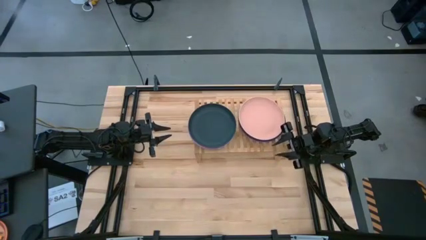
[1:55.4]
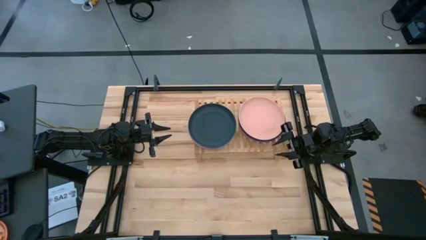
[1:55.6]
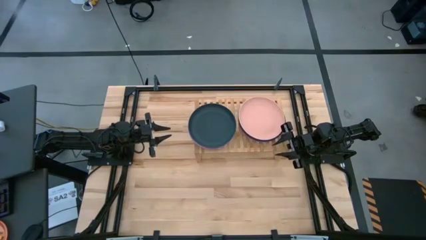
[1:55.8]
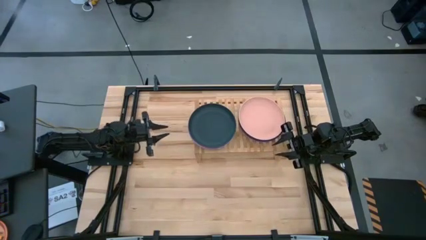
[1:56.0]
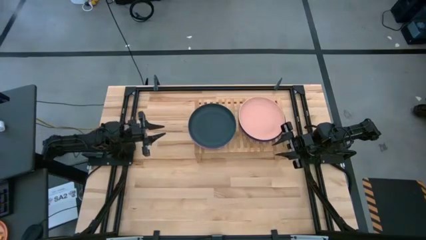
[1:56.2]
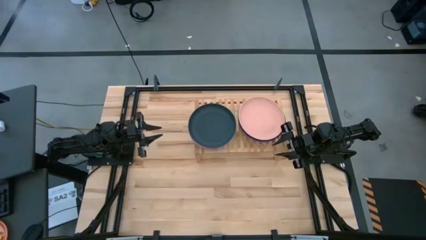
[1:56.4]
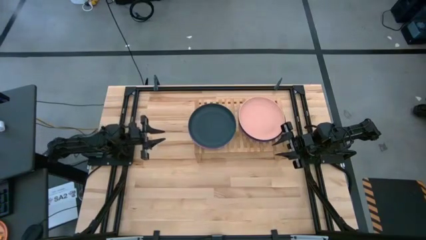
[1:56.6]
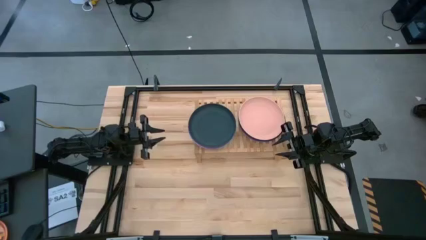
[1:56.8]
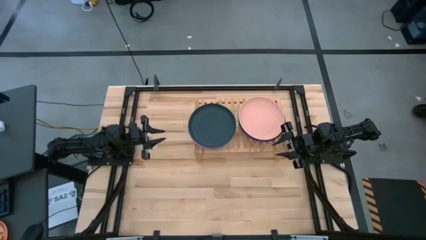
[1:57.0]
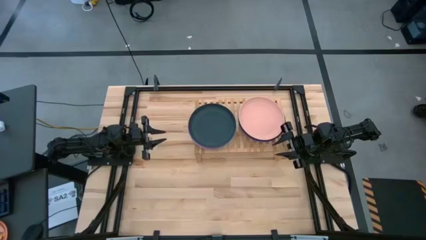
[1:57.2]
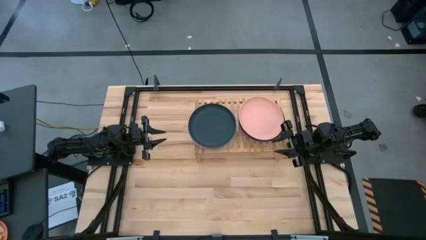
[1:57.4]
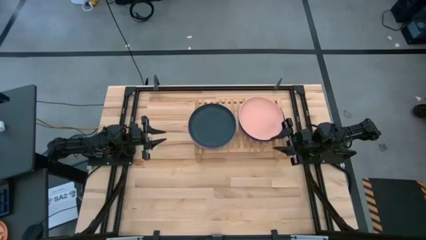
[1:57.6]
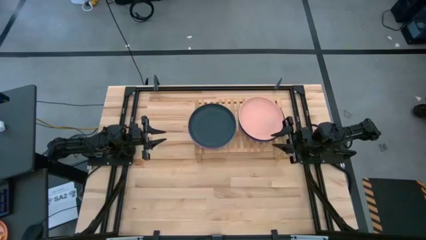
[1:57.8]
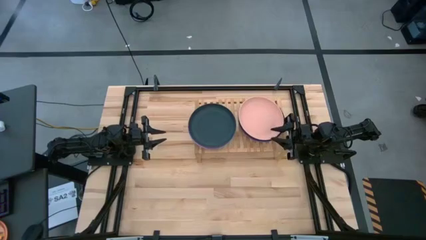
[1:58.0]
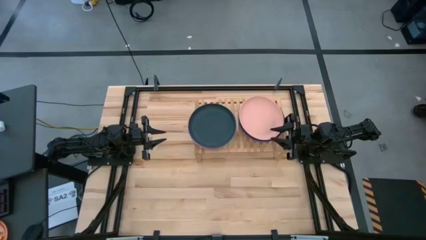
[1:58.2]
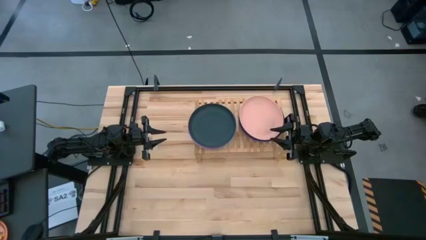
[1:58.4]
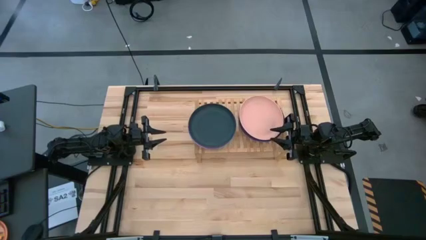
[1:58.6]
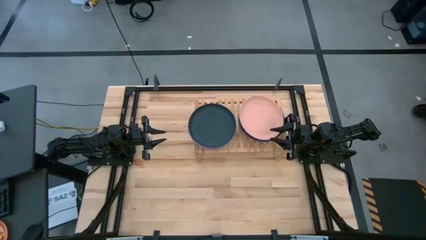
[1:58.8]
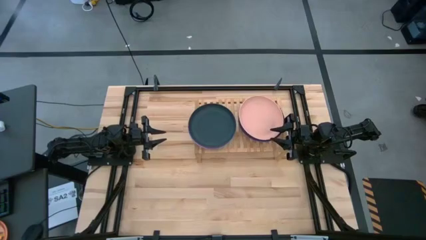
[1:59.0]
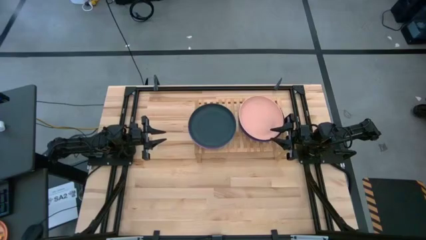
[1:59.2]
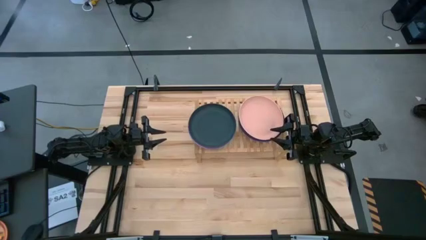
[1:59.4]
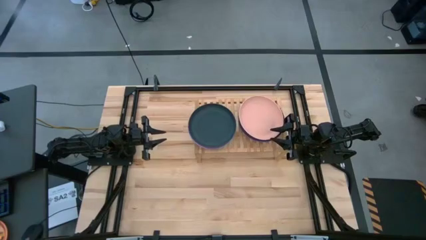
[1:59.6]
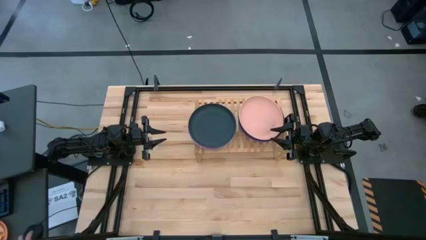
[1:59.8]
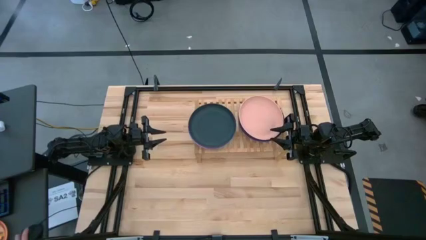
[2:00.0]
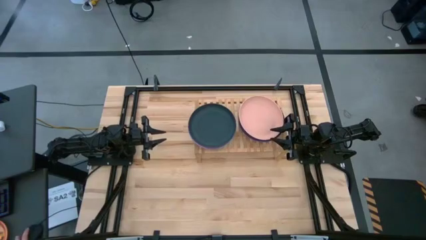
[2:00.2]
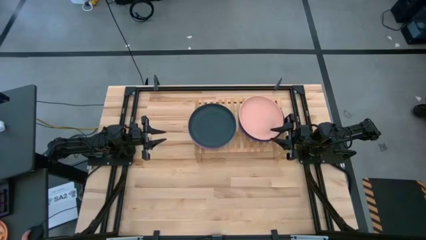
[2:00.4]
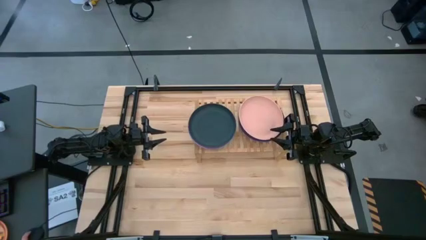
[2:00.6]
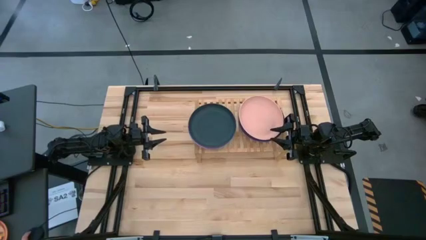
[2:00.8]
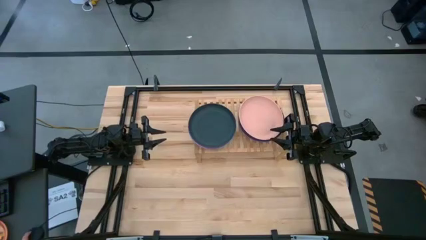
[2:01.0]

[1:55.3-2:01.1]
Task: Place and stack plates onto a shelf
Return to Home Position

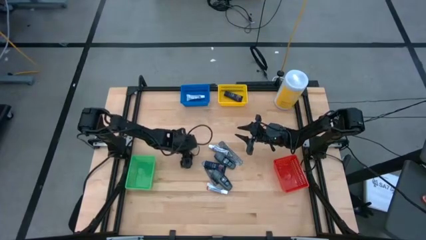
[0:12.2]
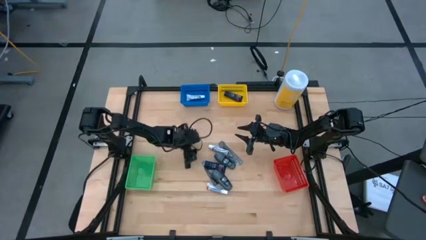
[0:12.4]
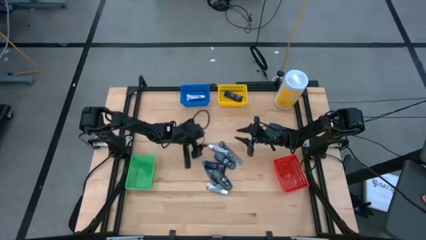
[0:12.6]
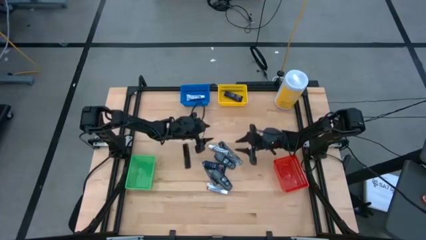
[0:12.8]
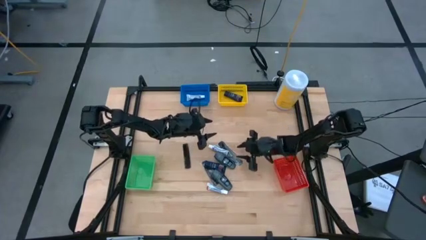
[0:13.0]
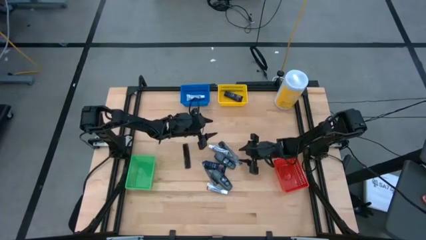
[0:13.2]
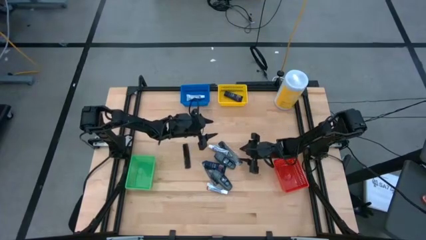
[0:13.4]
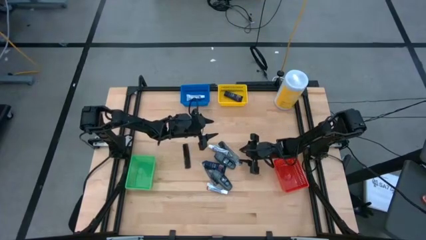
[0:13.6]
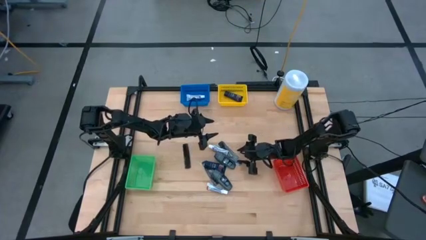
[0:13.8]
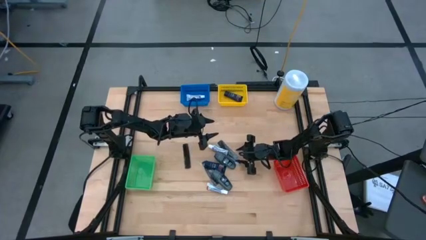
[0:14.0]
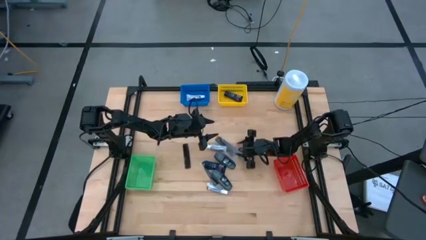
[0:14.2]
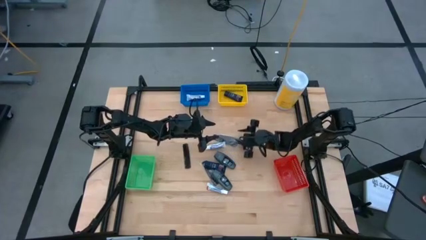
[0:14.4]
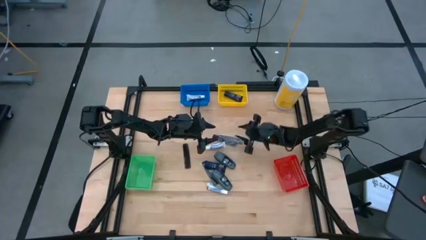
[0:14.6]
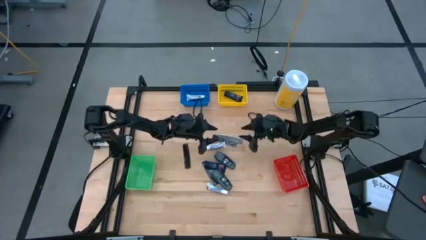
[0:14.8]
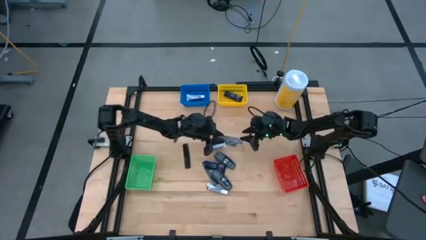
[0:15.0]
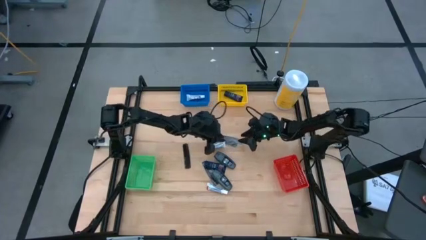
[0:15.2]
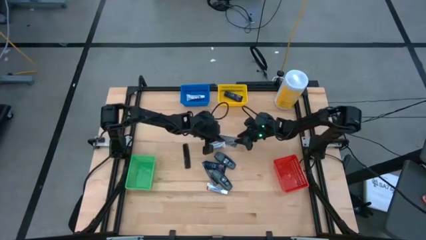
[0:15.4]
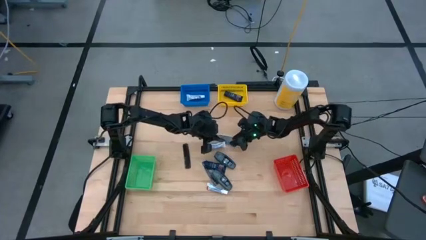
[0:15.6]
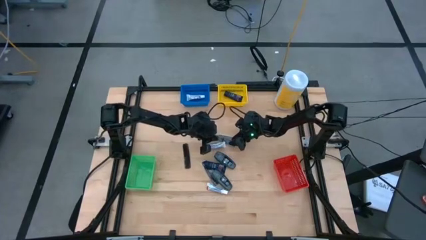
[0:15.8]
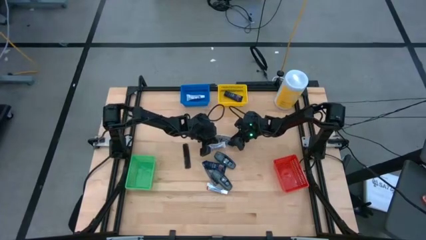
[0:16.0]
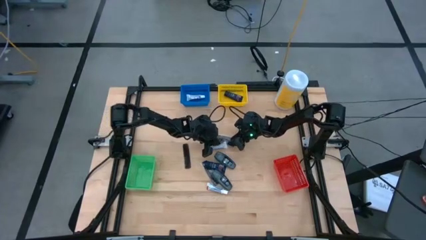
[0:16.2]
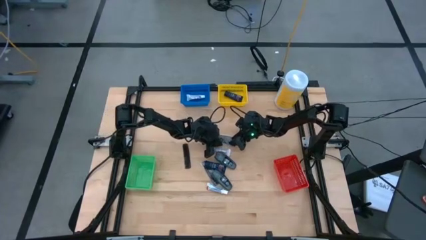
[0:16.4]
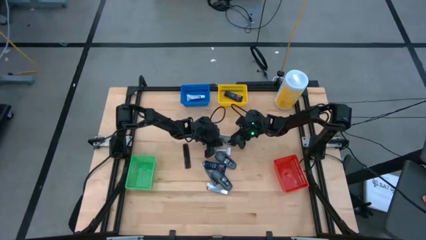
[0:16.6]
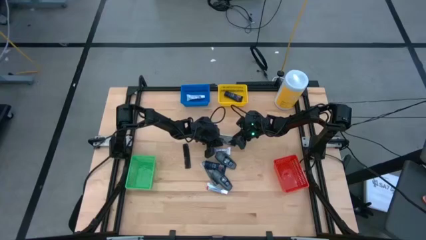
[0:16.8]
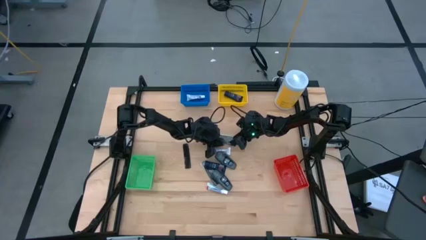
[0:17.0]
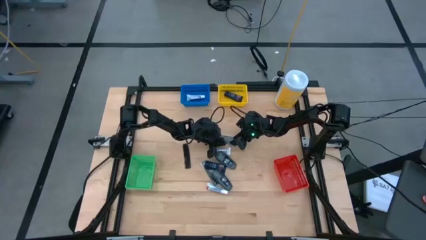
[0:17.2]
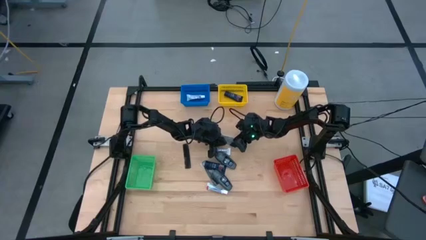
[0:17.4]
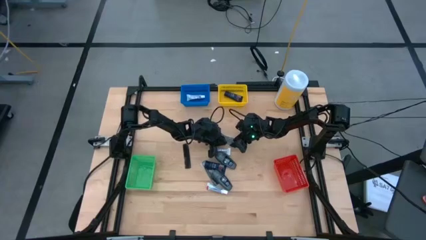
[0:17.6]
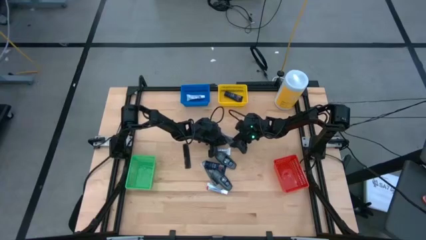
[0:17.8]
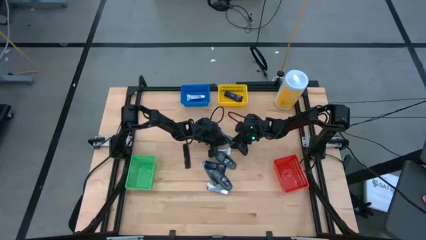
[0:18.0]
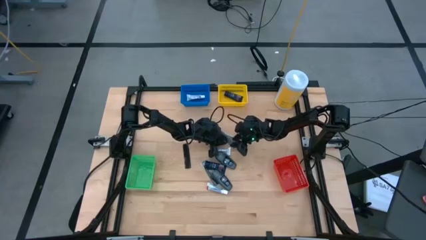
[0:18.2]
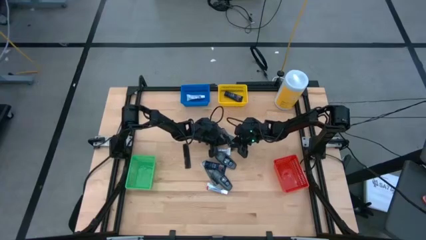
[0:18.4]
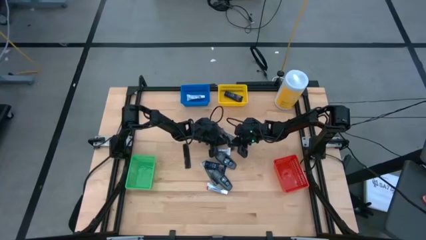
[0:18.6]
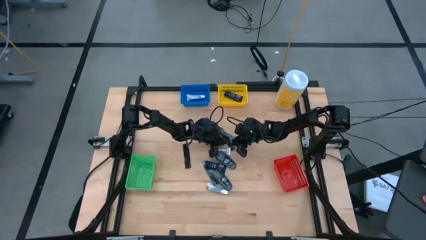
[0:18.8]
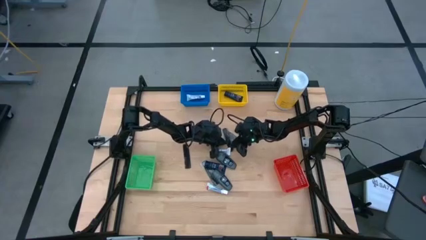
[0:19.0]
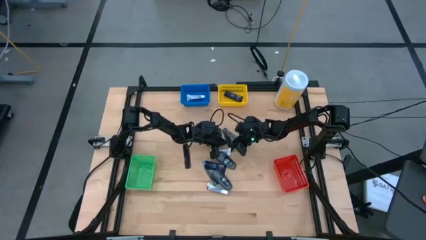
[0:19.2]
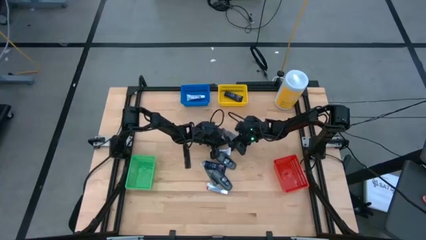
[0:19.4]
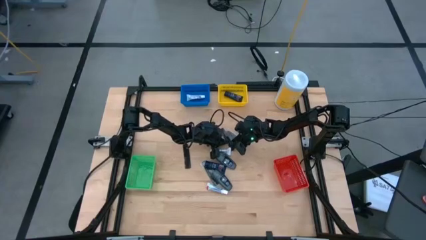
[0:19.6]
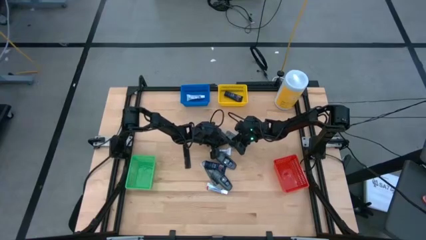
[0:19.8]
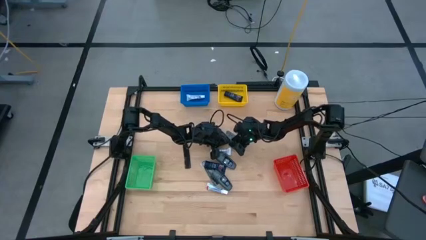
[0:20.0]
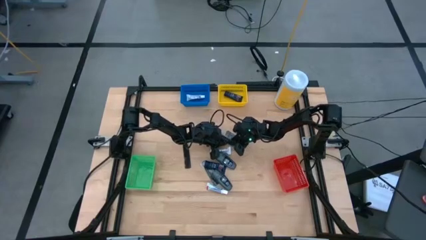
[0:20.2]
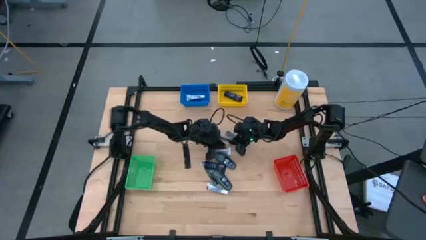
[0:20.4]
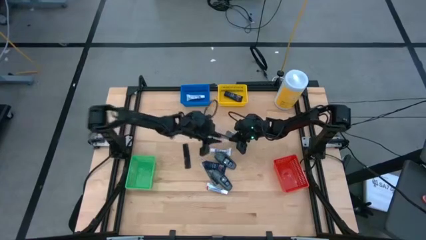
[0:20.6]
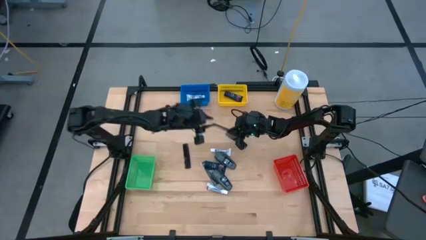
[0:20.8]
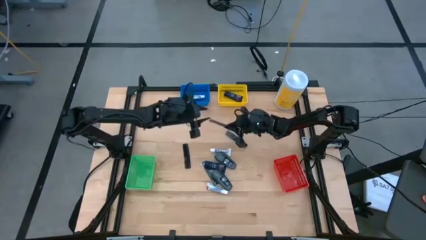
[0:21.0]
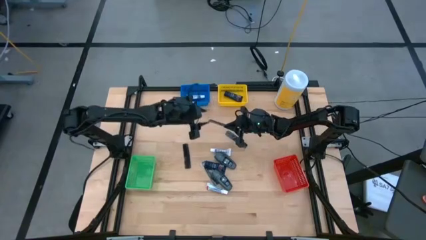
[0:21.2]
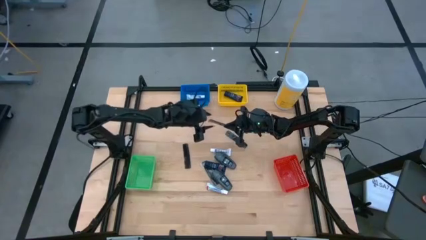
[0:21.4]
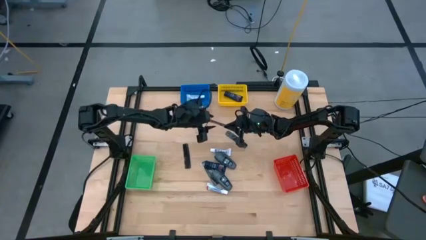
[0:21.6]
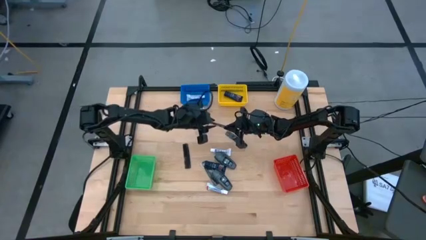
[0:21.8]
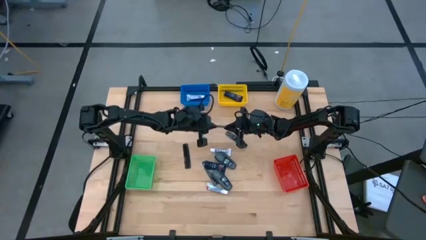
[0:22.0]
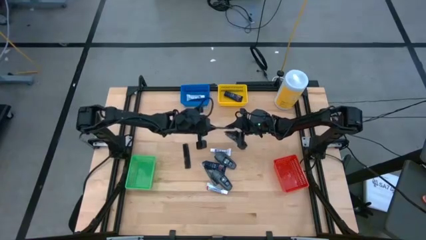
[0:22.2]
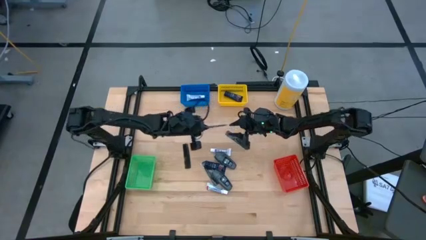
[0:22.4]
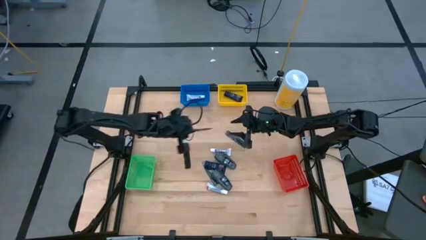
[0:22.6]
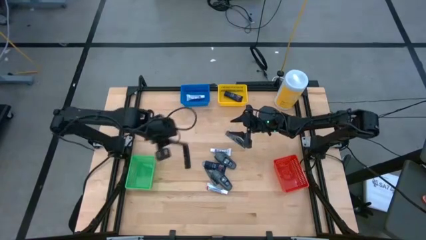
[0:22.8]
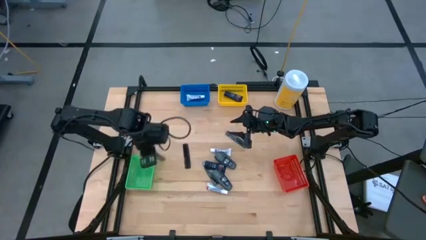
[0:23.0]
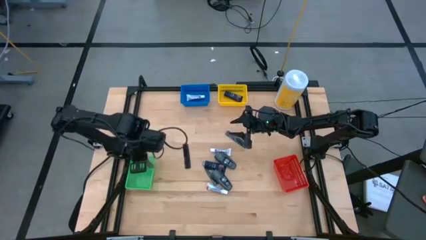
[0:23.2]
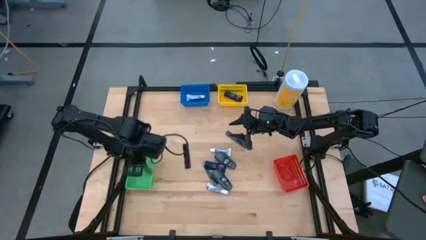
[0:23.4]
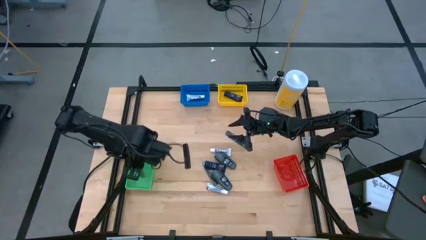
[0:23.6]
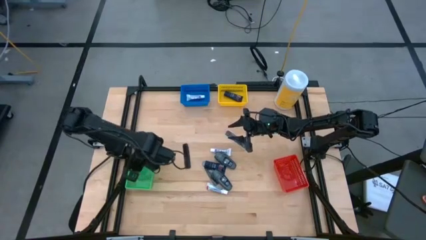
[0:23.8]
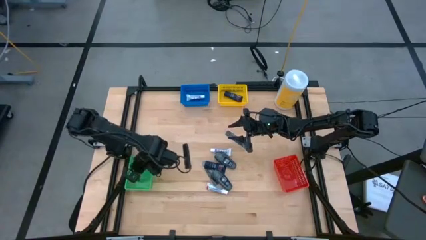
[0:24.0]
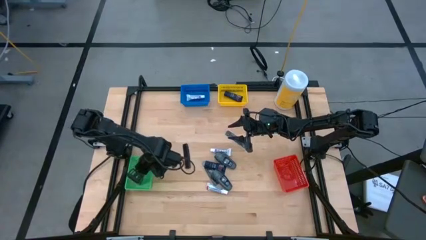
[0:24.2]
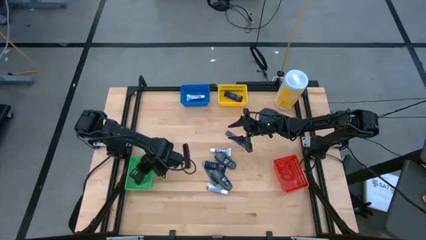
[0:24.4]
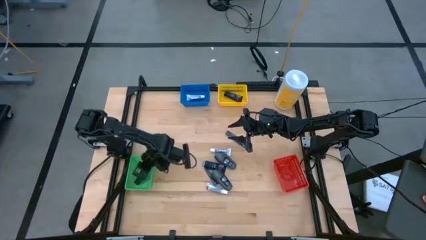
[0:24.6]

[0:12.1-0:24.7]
Task: Pick & Place Travel size toiletries
Put the black hair comb into the green bin
